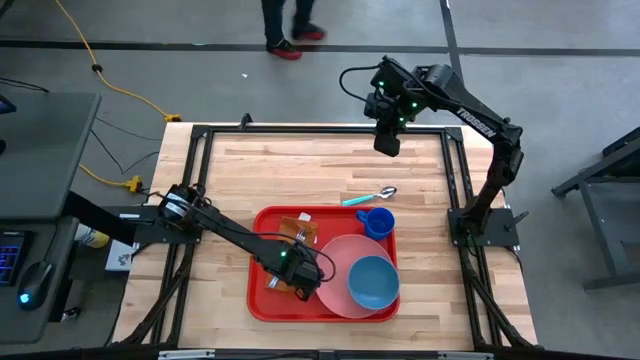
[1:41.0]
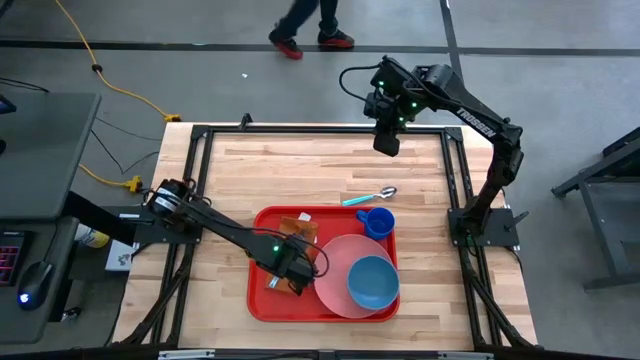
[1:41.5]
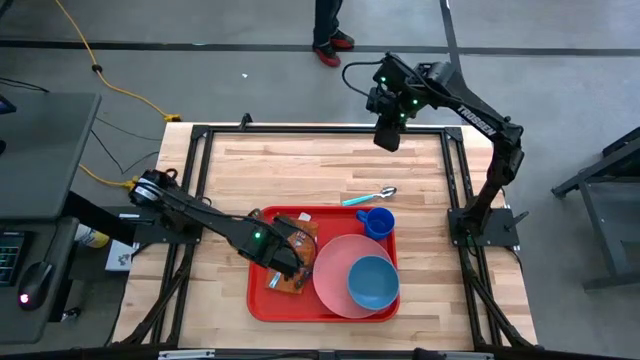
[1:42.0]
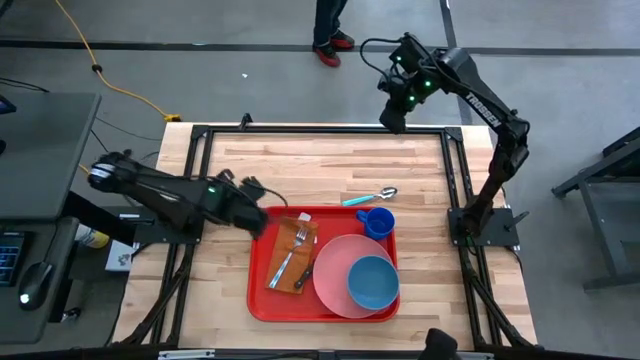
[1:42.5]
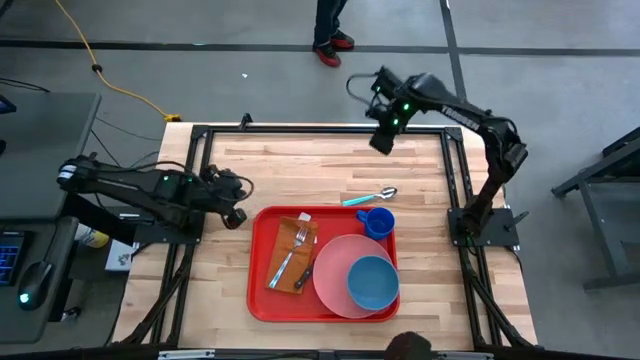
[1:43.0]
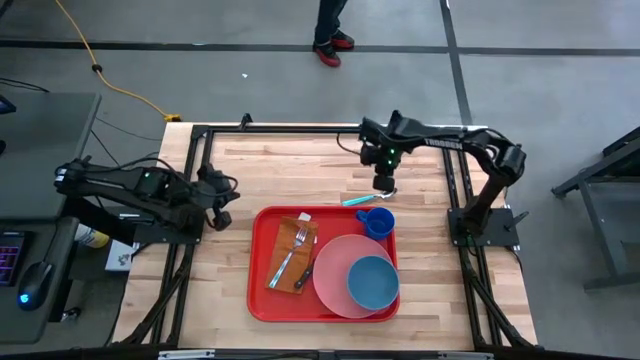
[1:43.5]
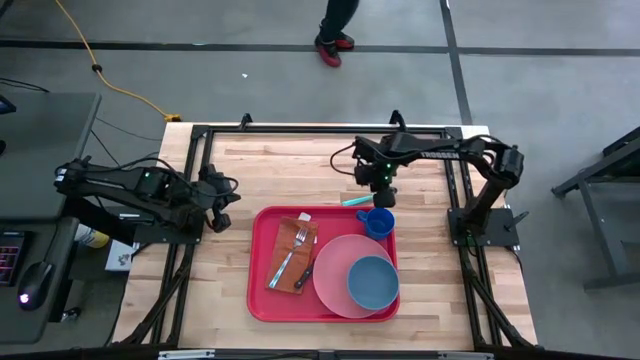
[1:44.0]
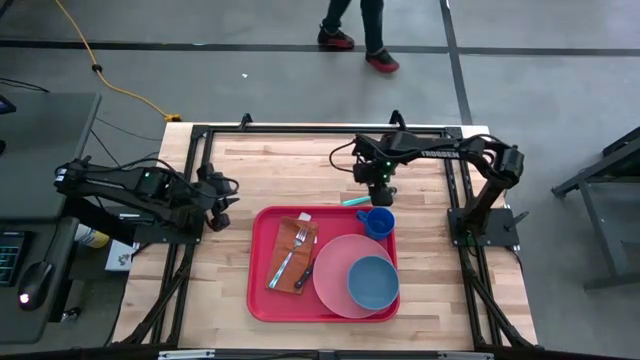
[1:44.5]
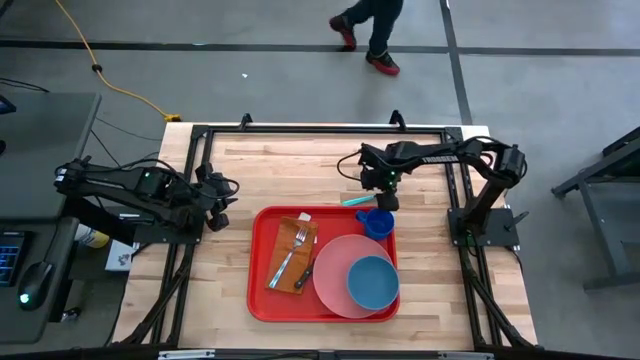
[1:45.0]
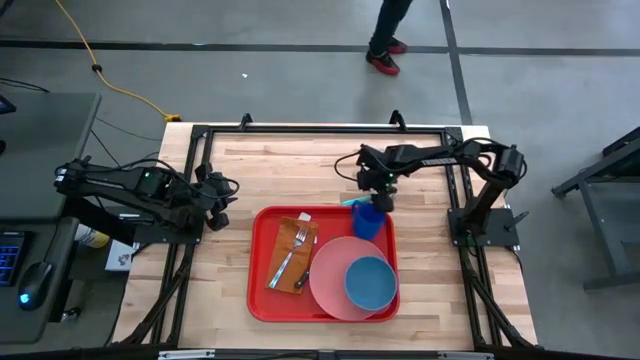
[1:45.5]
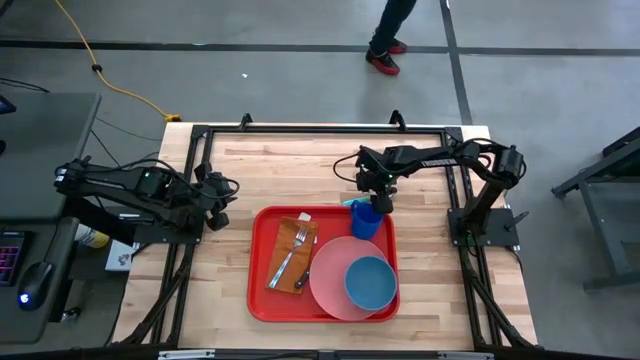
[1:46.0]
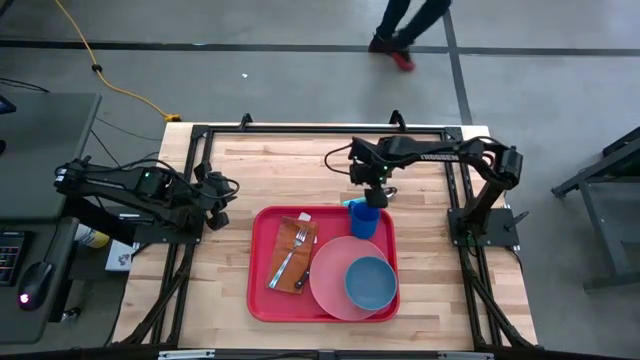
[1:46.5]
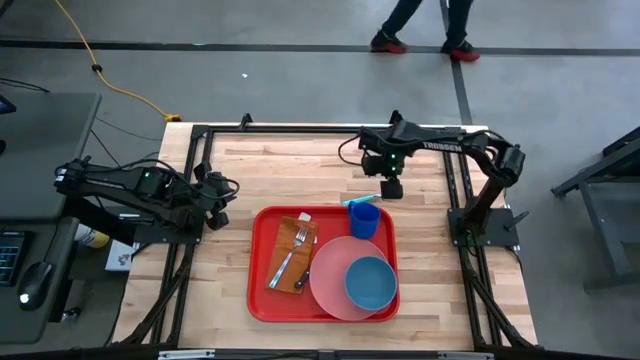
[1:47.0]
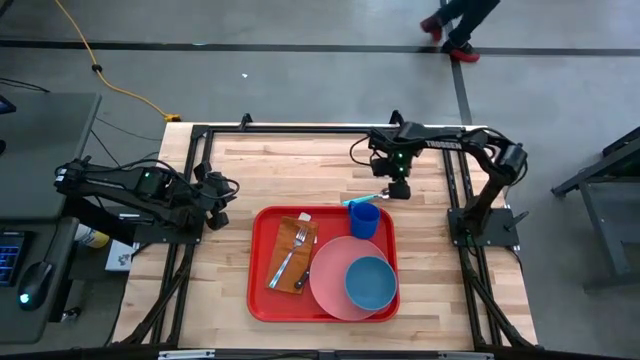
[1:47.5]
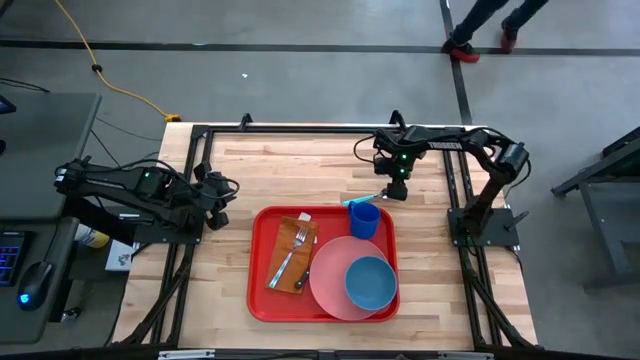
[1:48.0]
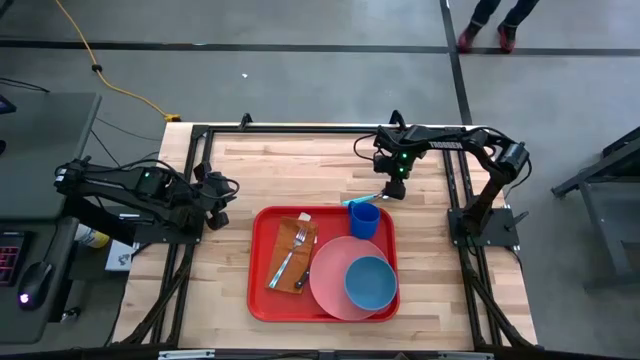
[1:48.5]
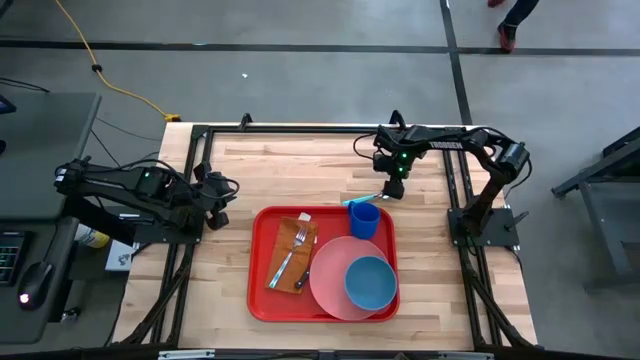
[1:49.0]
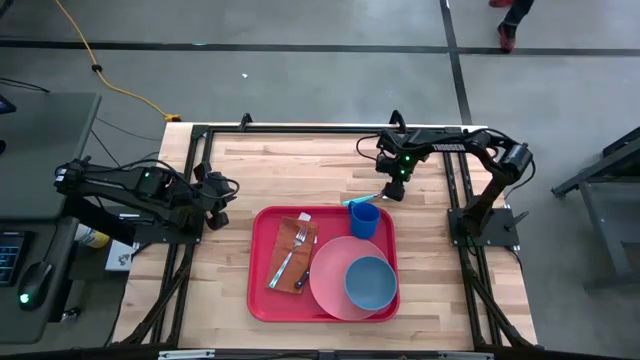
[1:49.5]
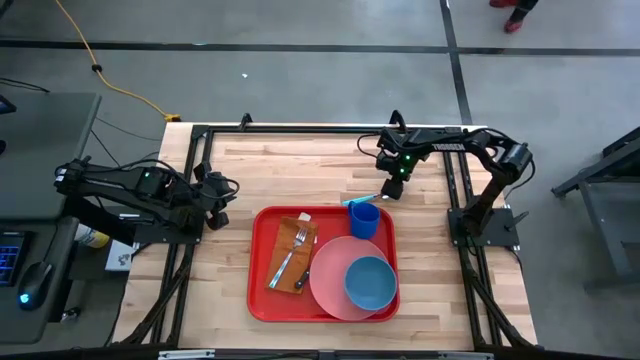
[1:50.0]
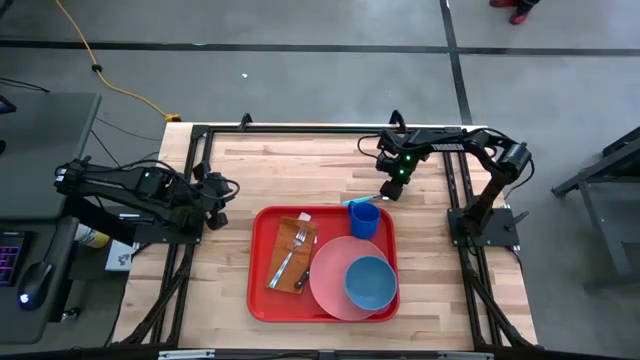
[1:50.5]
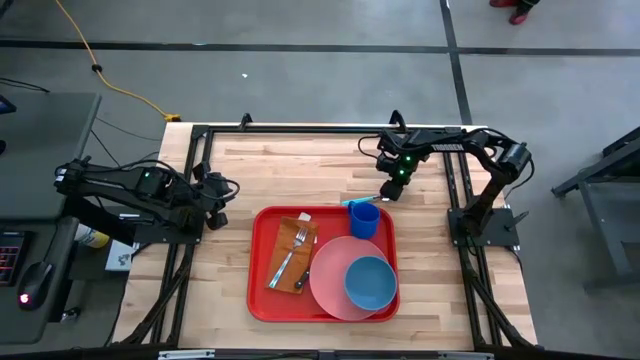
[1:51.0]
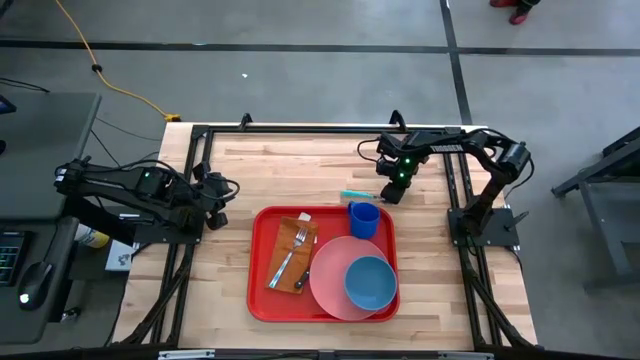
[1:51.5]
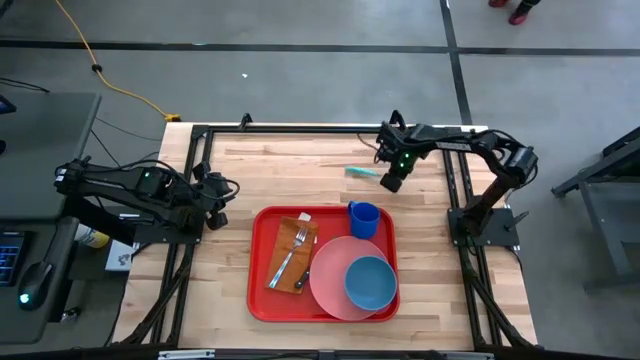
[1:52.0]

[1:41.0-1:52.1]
Task: Set up tray
Put the blue spoon on top of the orange napkin on the serving tray

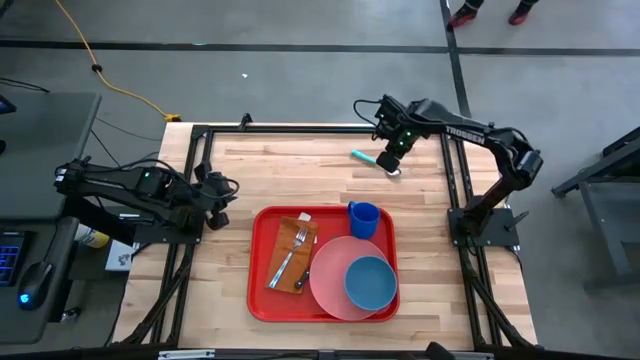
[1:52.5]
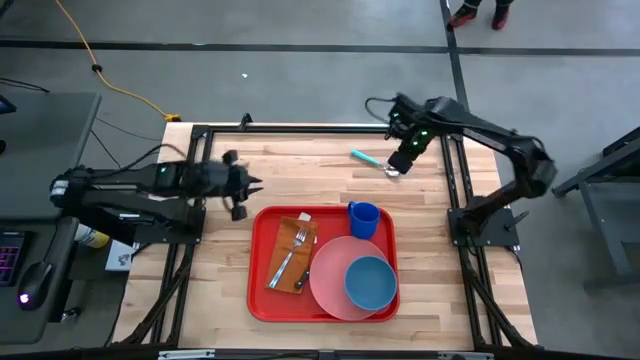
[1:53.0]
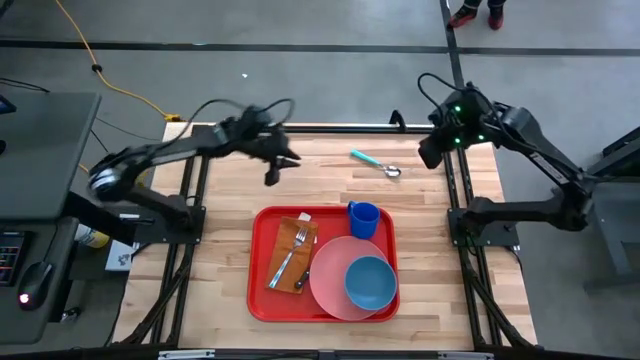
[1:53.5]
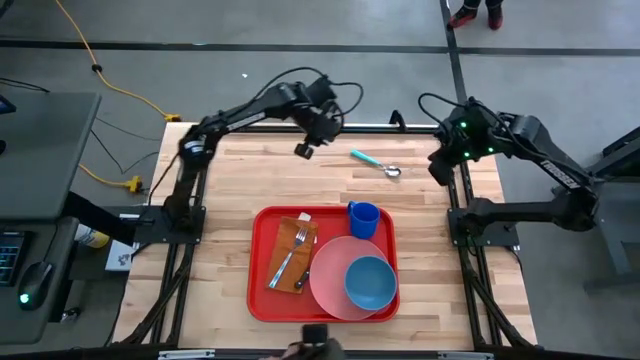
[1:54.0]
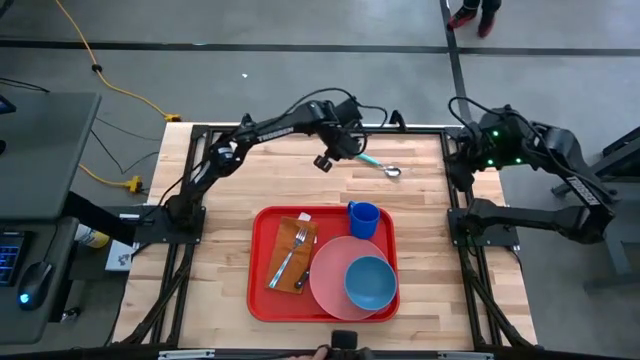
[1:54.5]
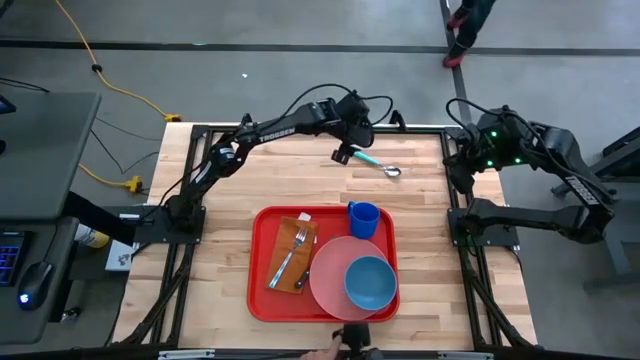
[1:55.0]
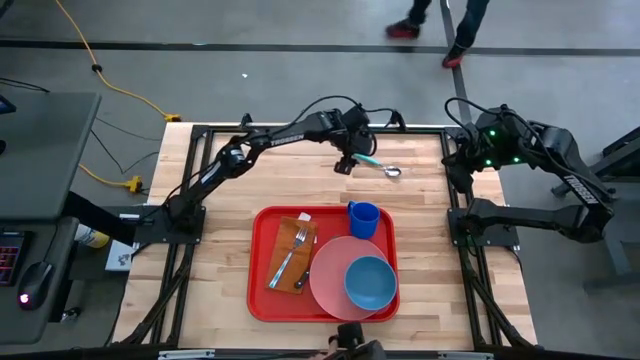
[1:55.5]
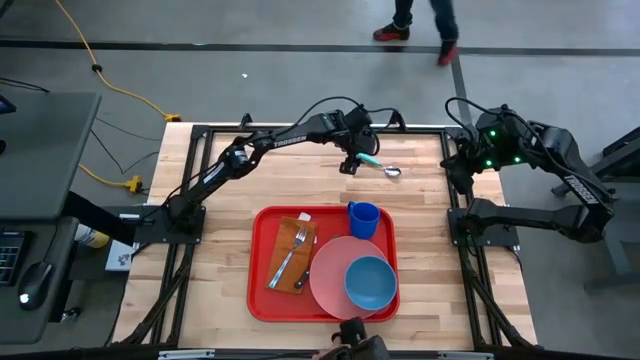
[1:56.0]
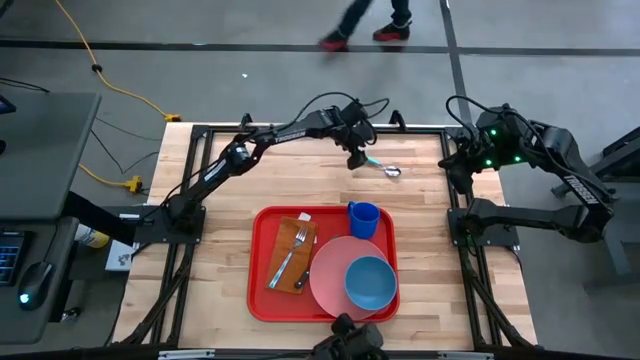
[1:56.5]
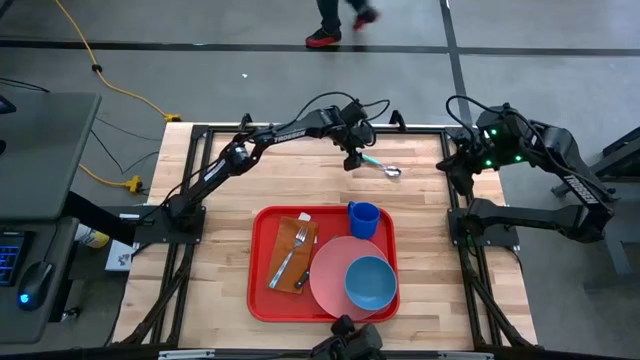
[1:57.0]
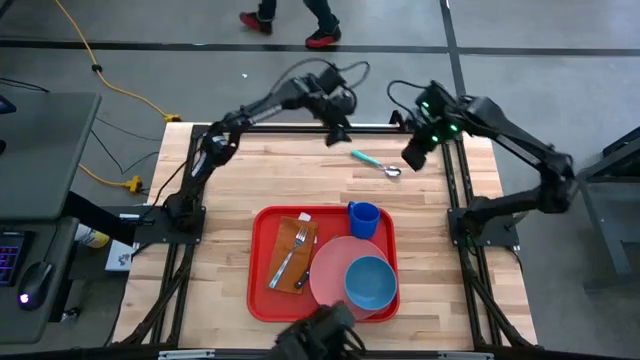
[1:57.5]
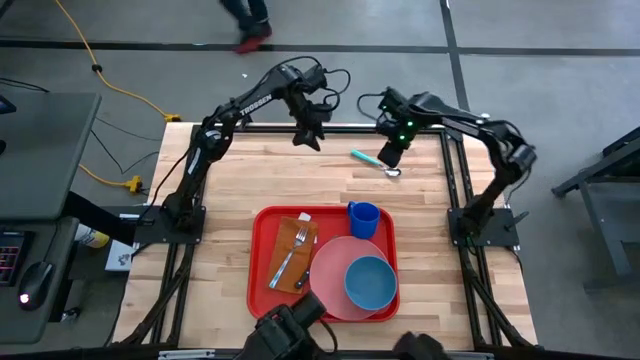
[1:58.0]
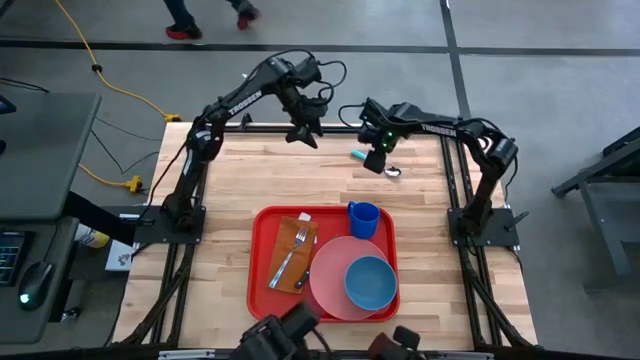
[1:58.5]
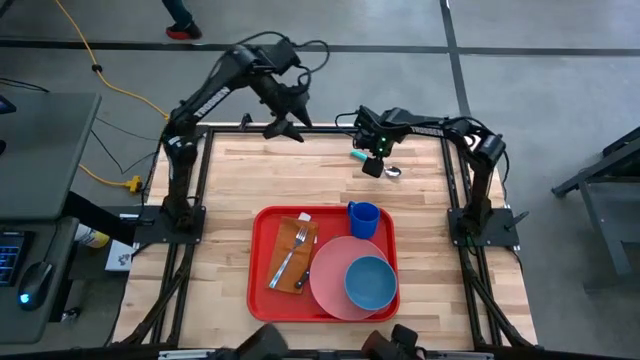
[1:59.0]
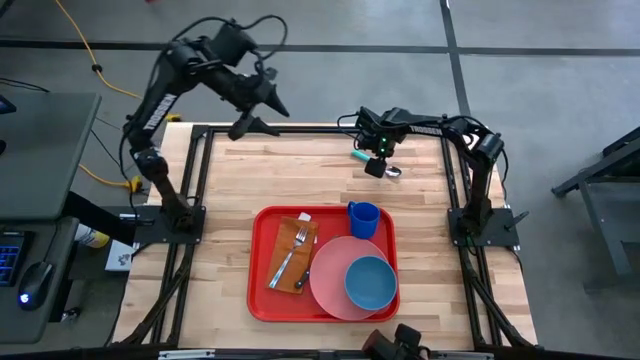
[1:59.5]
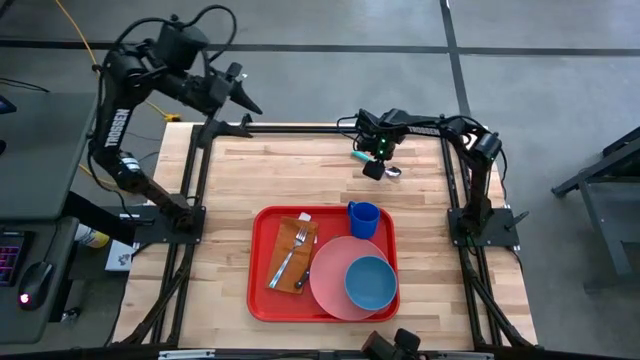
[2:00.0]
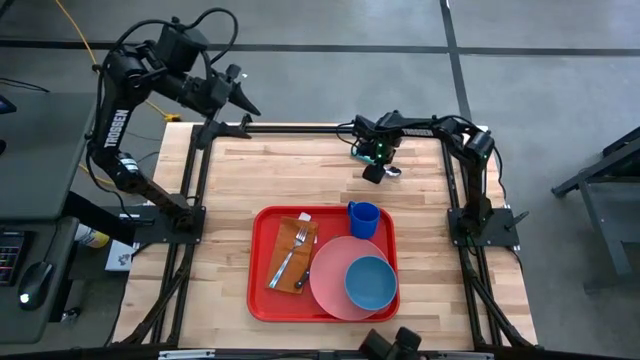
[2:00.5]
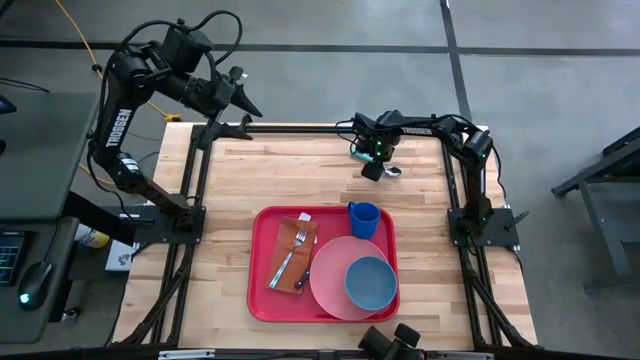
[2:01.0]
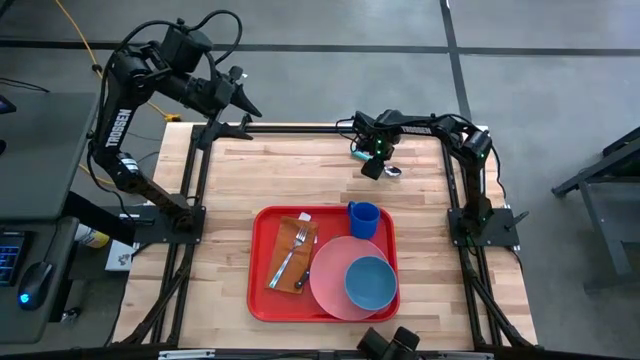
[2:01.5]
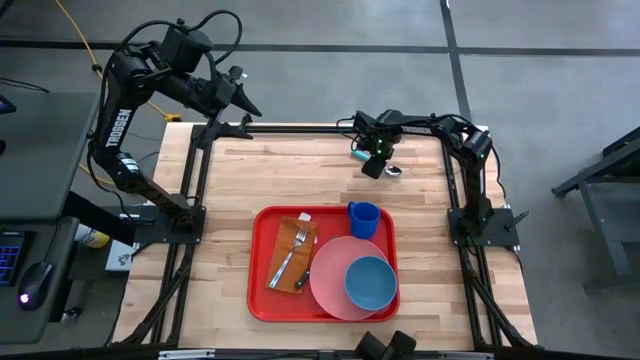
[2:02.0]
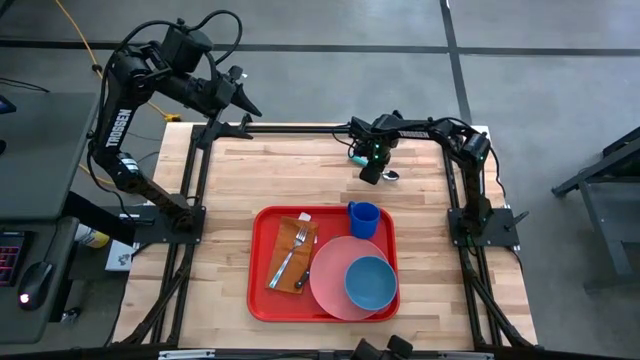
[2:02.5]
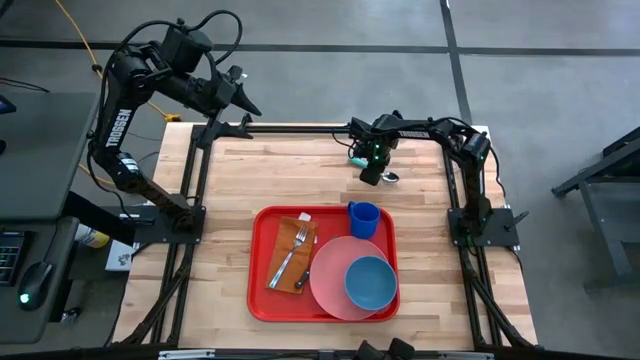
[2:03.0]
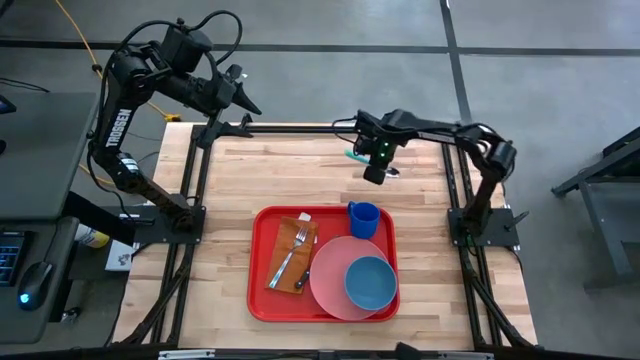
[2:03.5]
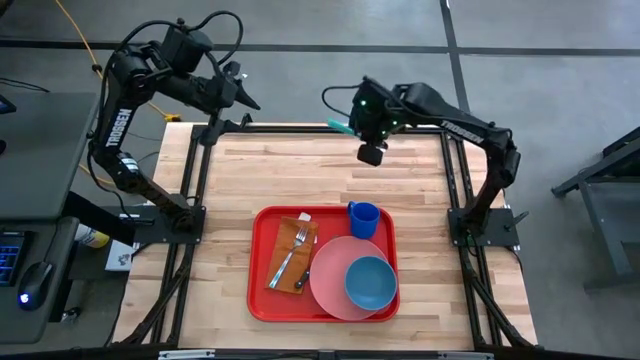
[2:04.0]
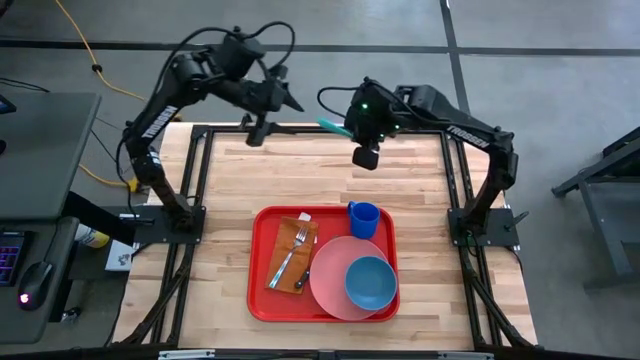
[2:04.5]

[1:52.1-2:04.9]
Put the blue spoon on top of the orange napkin on the serving tray
